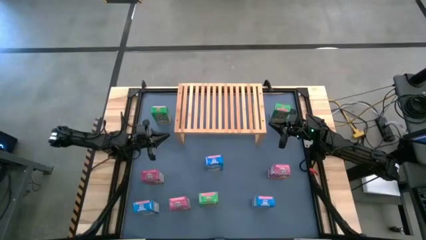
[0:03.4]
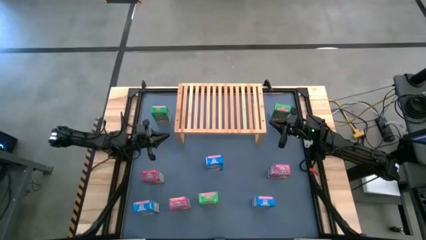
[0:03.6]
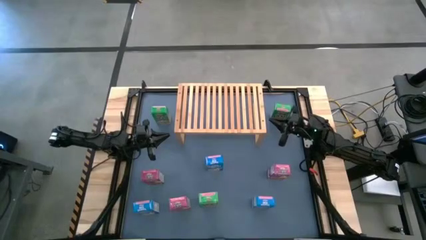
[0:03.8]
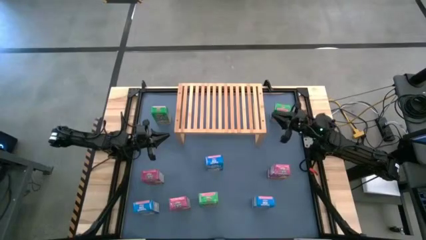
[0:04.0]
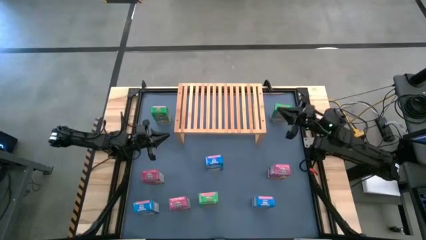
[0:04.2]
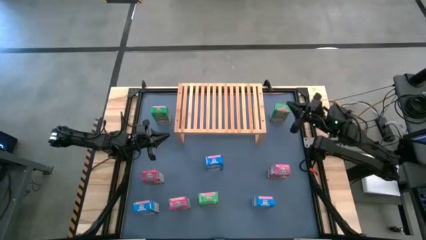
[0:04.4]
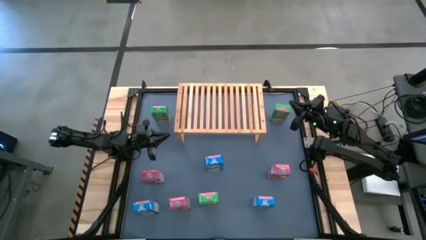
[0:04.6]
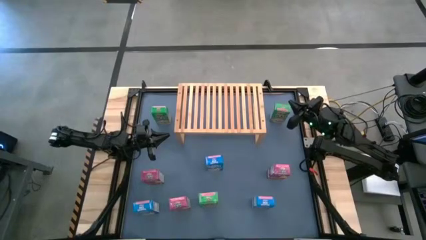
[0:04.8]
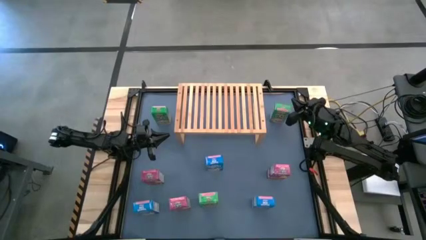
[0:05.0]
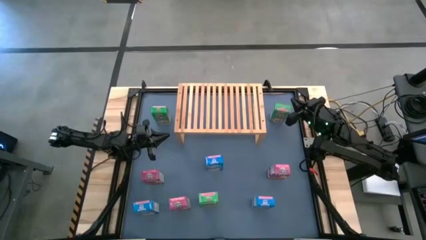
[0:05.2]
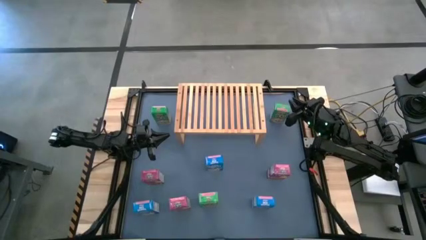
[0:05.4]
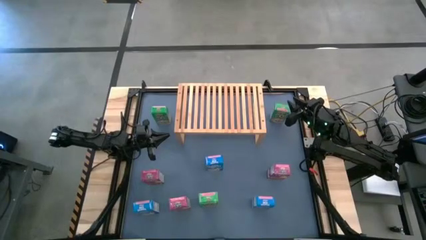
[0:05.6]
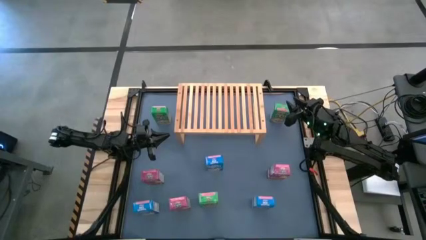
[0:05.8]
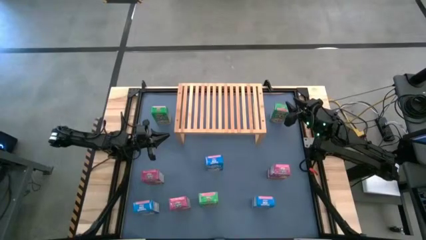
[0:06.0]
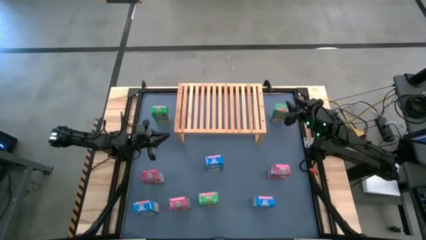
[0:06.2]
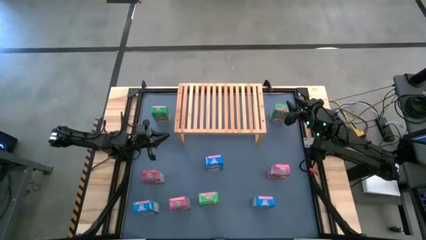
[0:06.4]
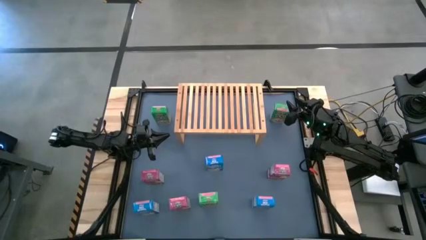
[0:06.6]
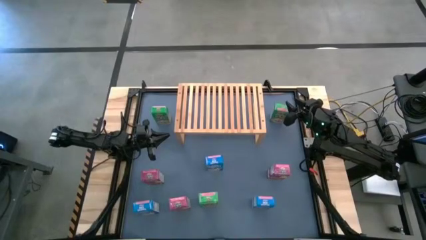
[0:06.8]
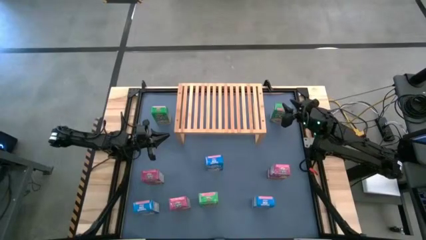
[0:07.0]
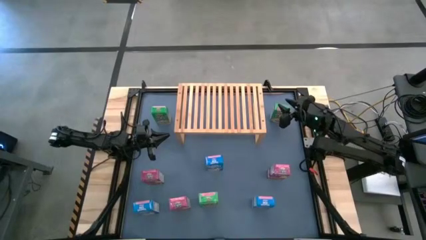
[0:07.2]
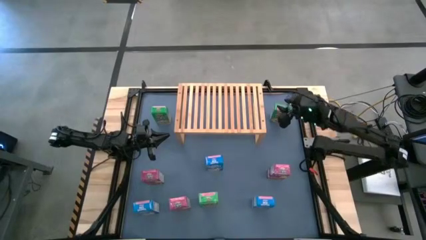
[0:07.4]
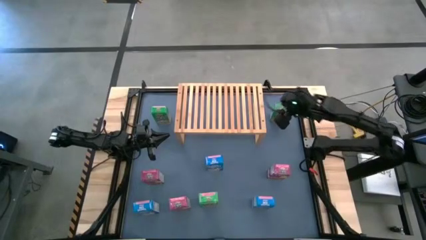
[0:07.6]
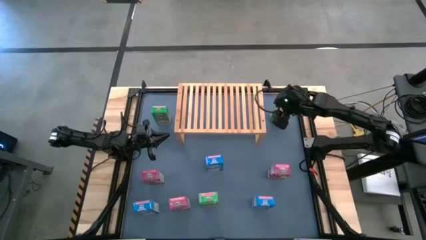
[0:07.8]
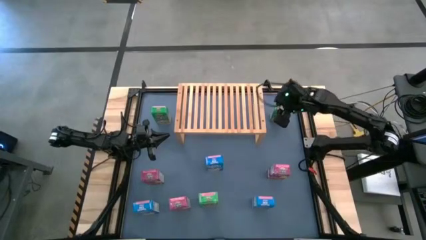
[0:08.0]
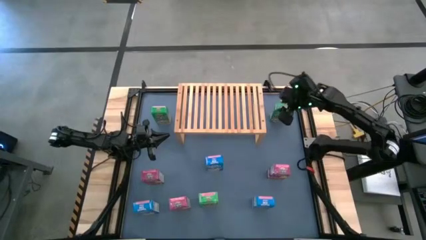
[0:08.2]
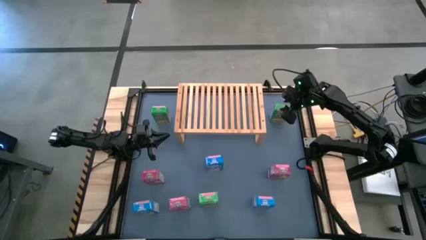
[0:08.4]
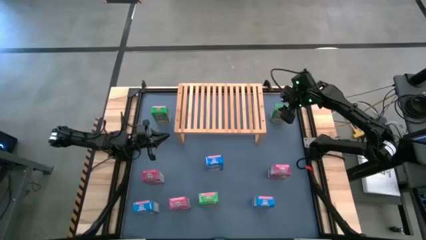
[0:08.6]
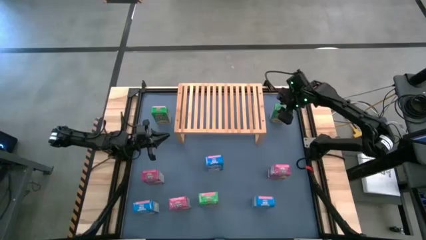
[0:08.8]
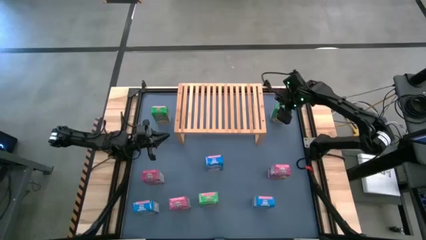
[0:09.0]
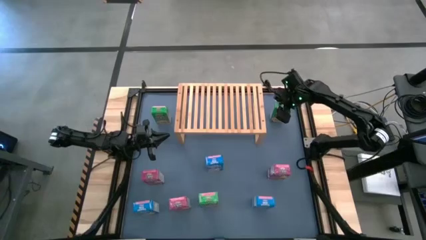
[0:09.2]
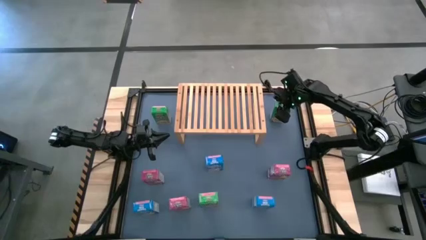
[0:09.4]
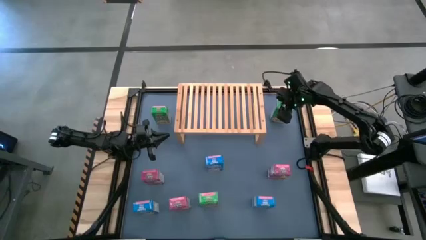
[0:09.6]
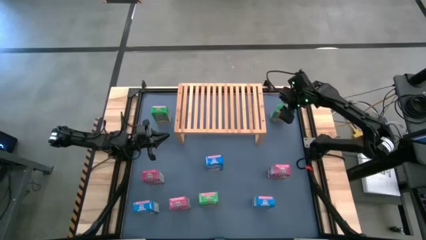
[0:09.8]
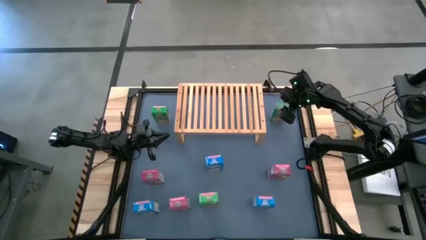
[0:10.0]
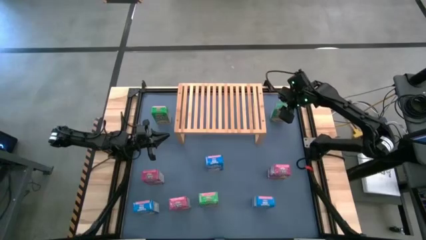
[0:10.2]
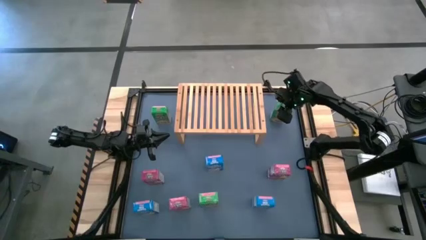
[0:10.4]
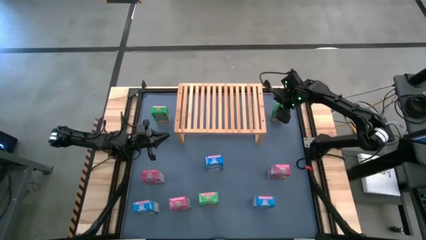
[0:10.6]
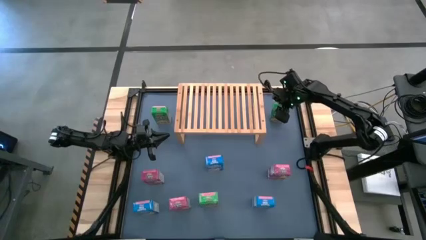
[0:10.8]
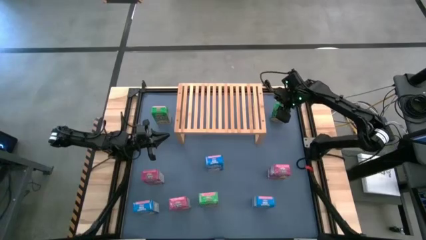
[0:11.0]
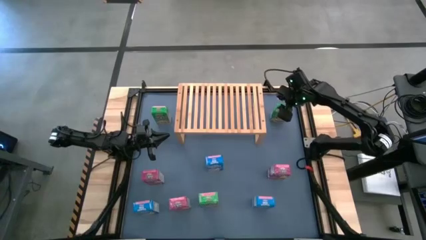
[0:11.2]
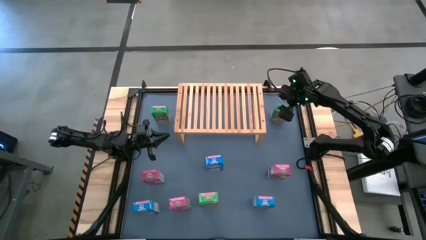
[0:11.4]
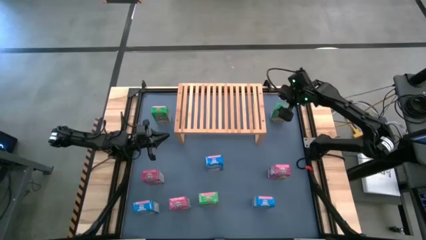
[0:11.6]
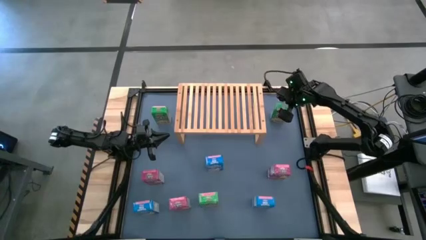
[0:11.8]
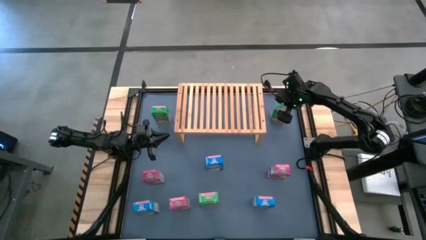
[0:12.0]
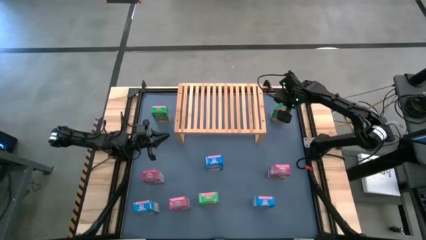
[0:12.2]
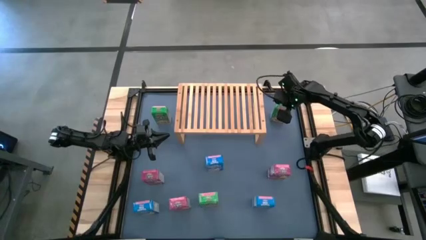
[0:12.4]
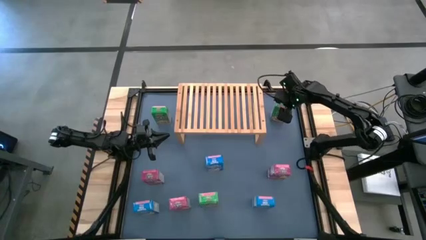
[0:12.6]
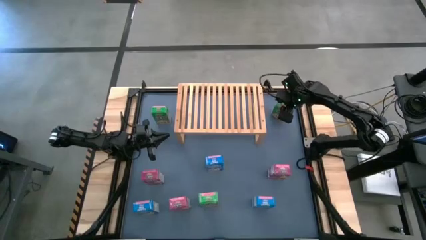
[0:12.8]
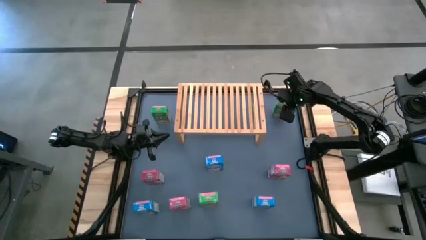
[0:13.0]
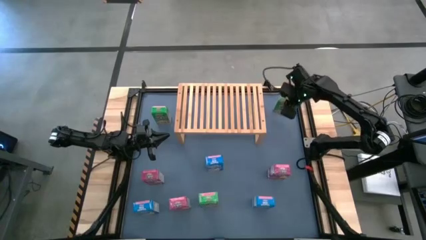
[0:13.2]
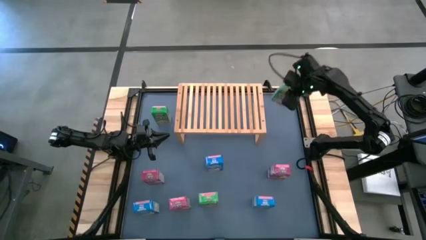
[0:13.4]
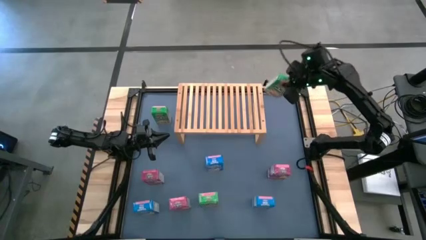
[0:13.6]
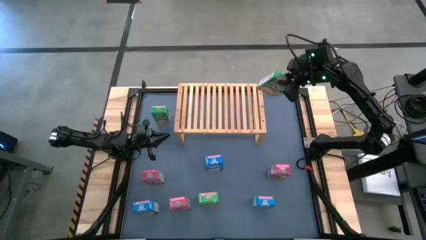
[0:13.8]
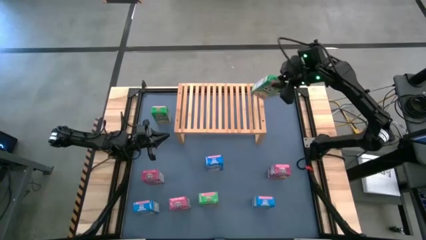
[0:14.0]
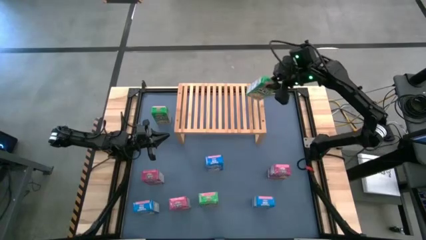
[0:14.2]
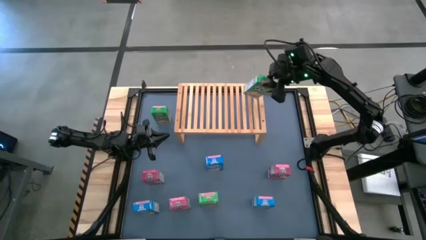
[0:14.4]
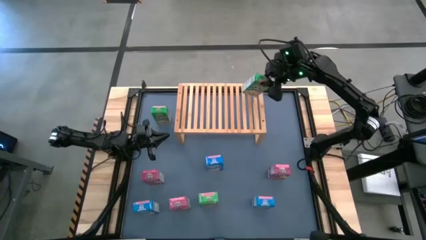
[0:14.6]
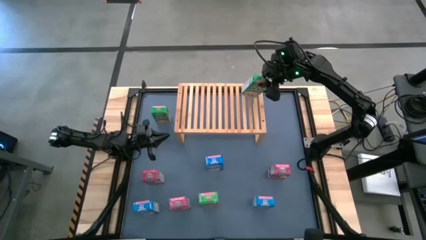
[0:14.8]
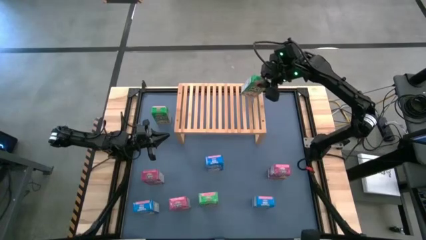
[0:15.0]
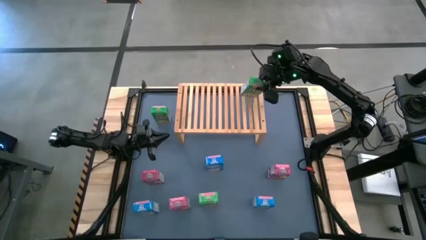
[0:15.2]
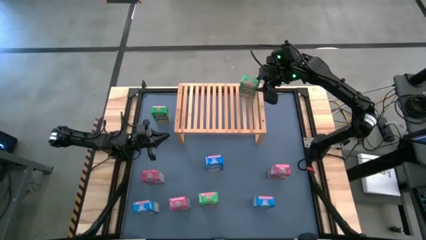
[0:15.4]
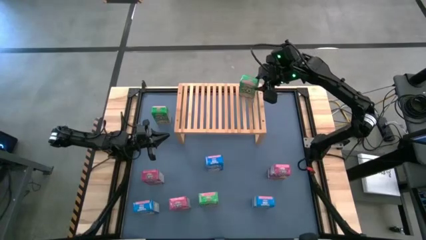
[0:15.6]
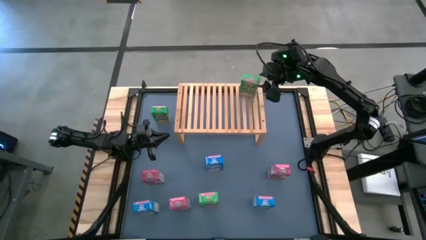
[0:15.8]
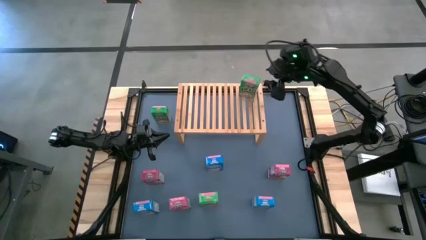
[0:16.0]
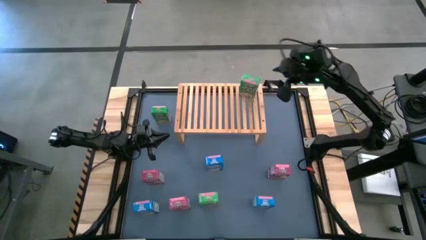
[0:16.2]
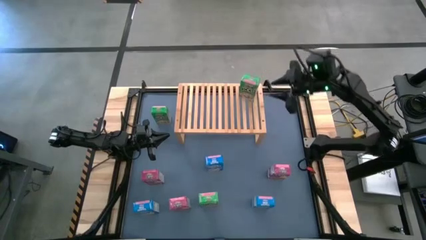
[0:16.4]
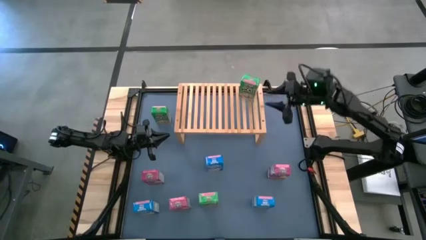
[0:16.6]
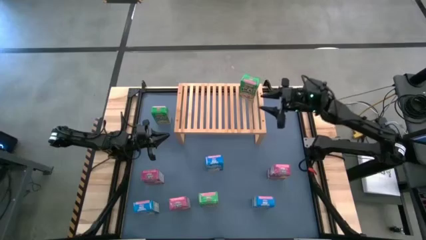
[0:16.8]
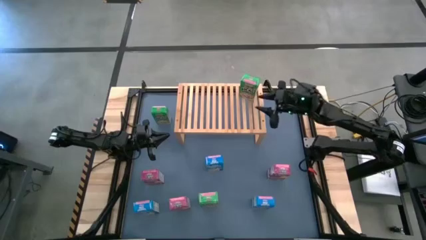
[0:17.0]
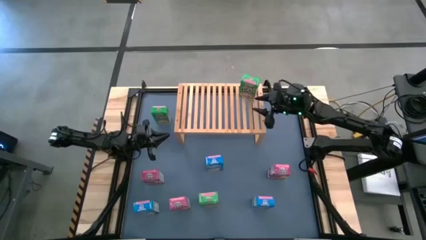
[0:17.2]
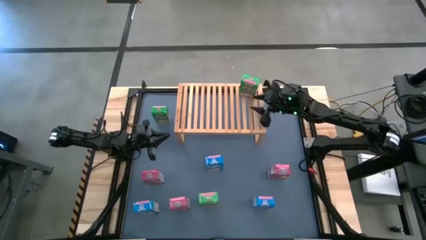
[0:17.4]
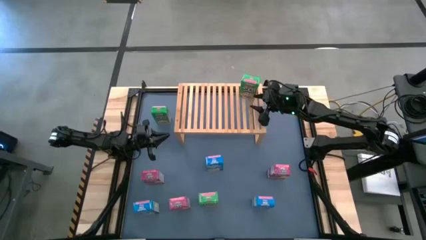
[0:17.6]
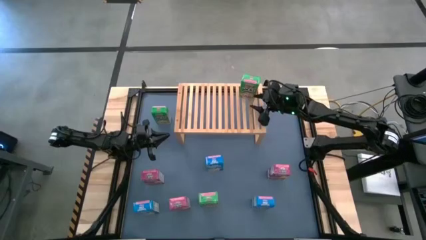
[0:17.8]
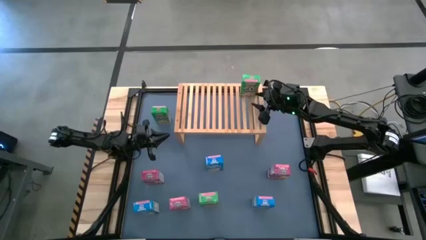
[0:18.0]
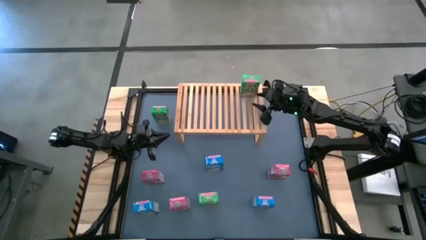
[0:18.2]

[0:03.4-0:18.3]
Task: Stack cereal on shelf
Put the top right green cereal box on the shelf
